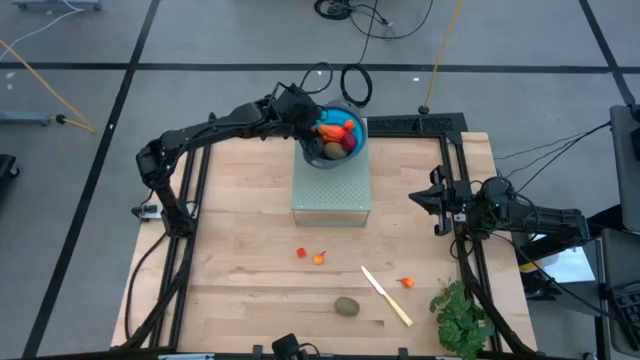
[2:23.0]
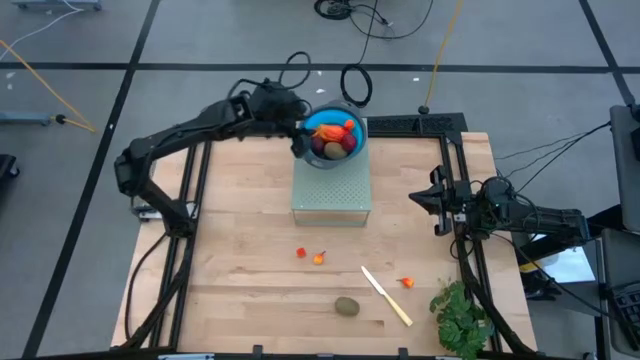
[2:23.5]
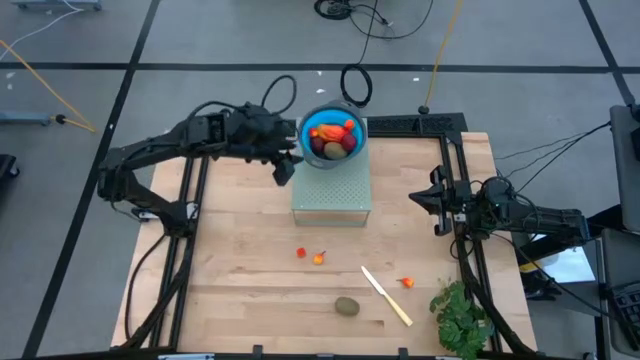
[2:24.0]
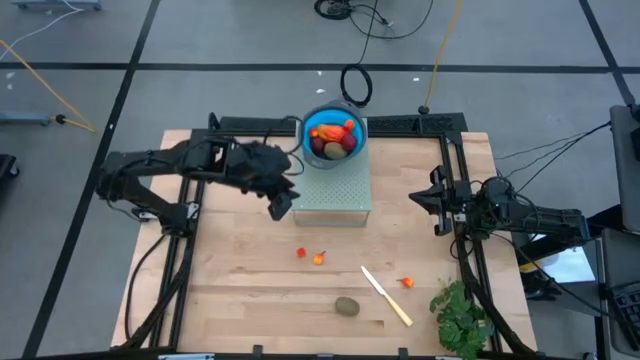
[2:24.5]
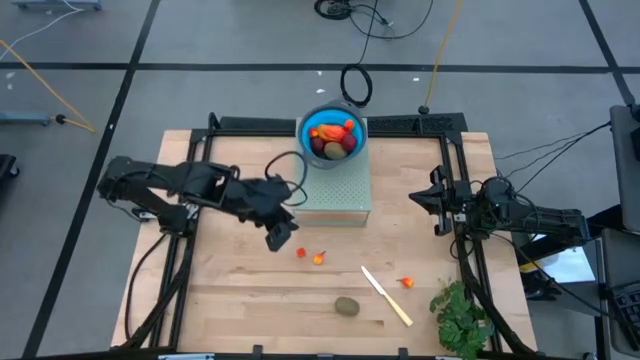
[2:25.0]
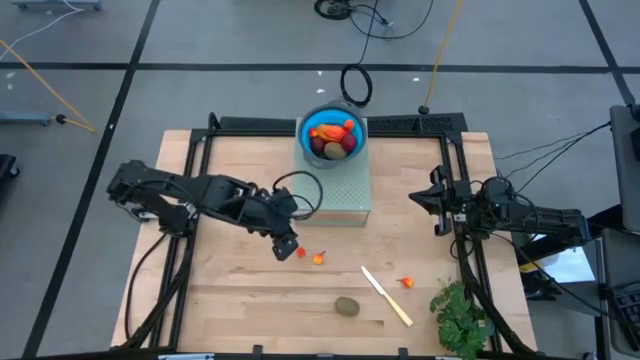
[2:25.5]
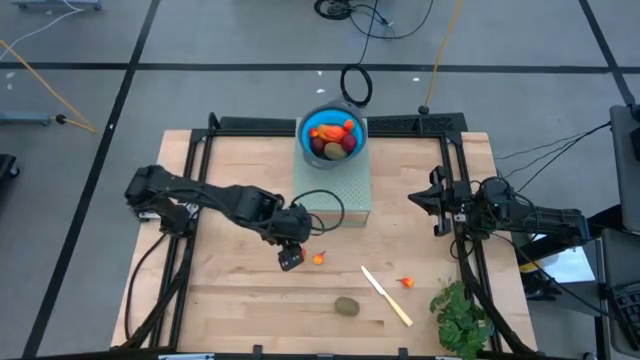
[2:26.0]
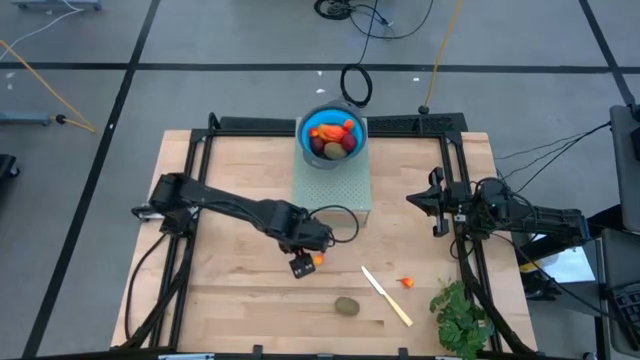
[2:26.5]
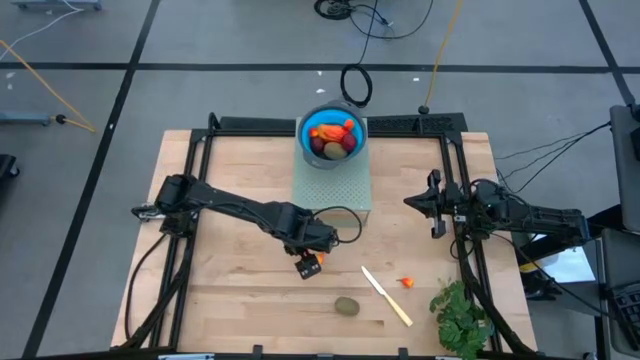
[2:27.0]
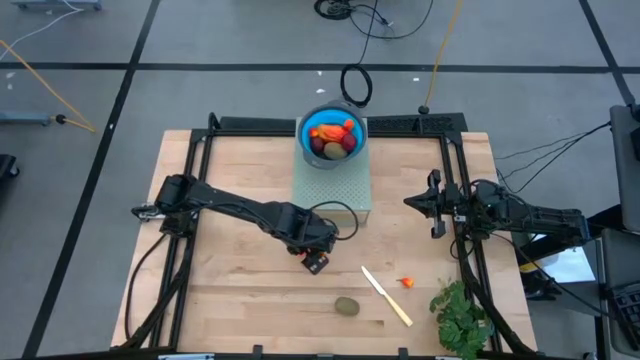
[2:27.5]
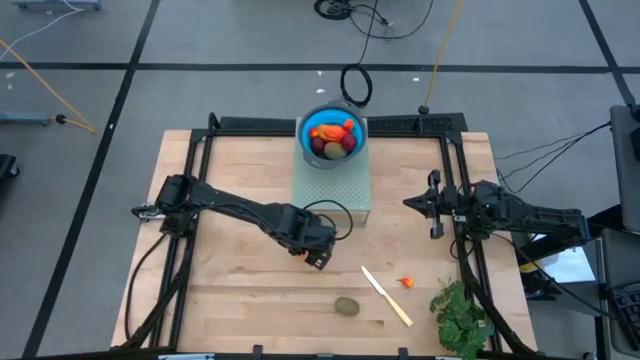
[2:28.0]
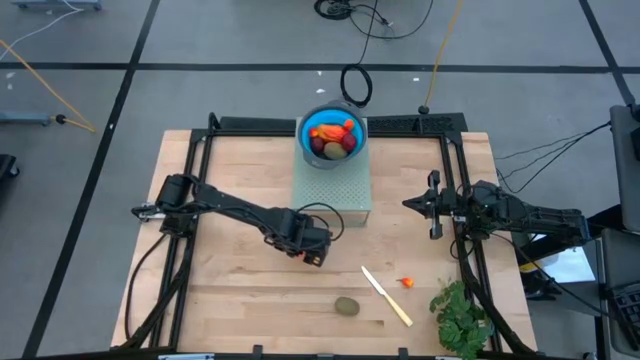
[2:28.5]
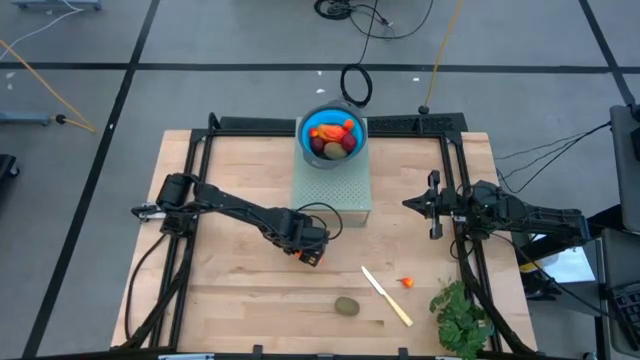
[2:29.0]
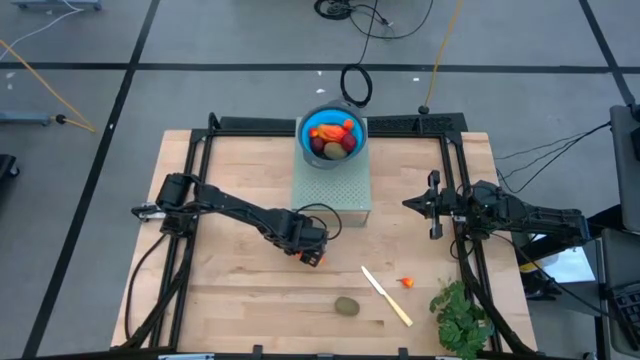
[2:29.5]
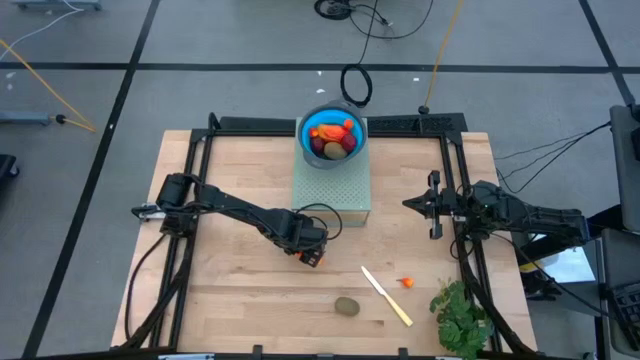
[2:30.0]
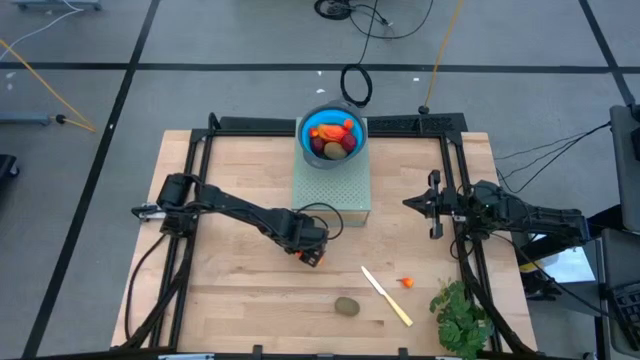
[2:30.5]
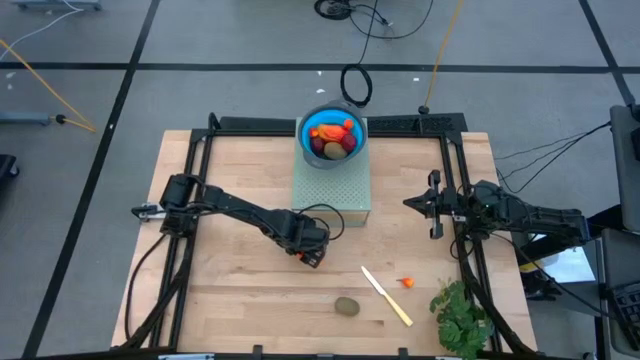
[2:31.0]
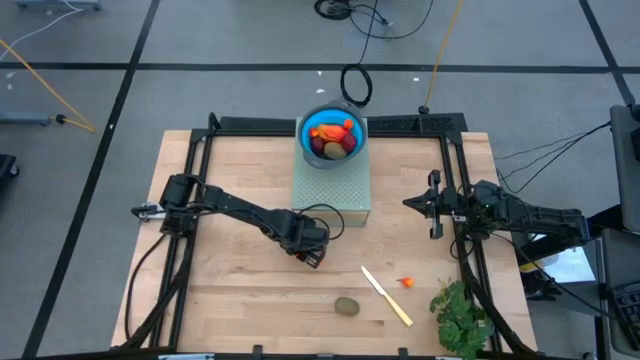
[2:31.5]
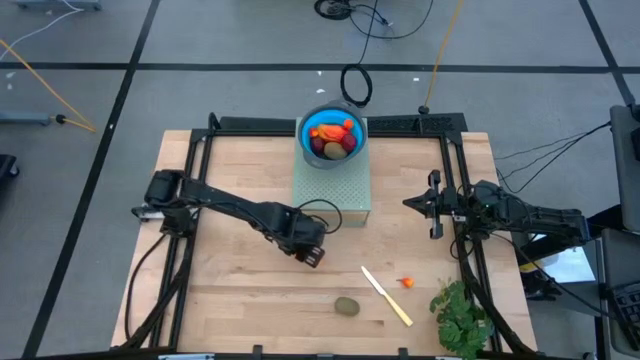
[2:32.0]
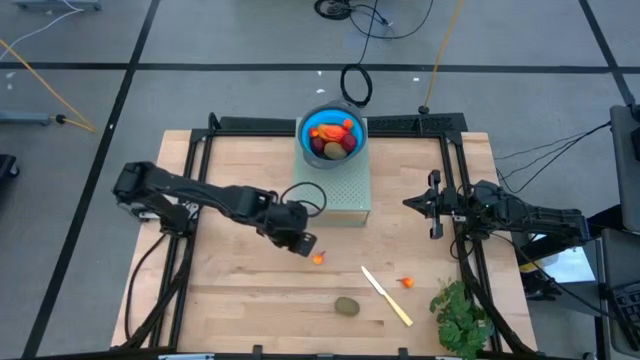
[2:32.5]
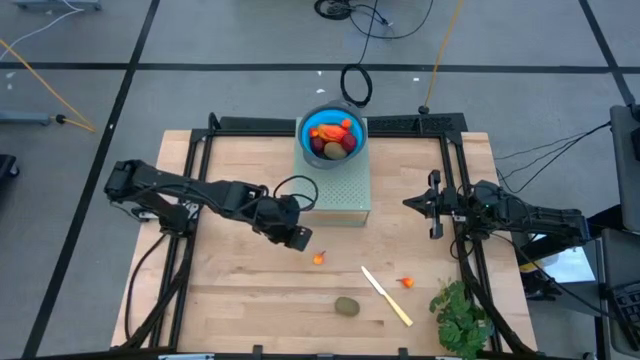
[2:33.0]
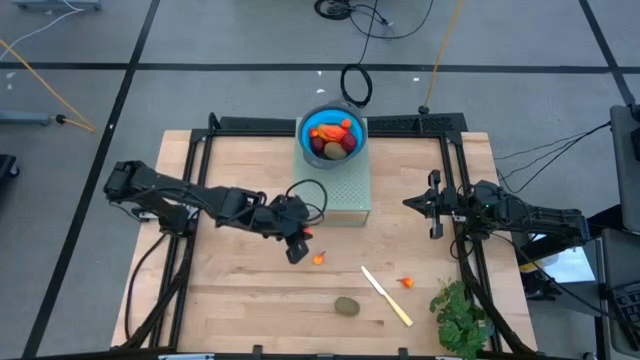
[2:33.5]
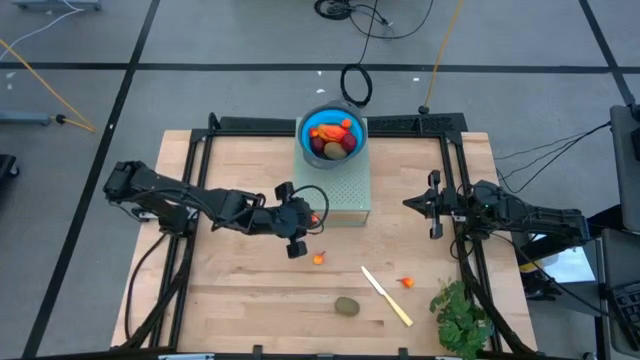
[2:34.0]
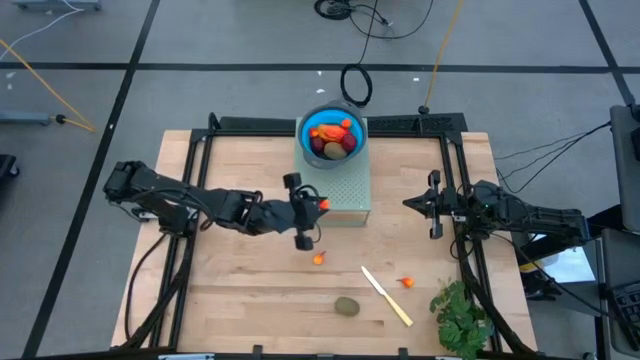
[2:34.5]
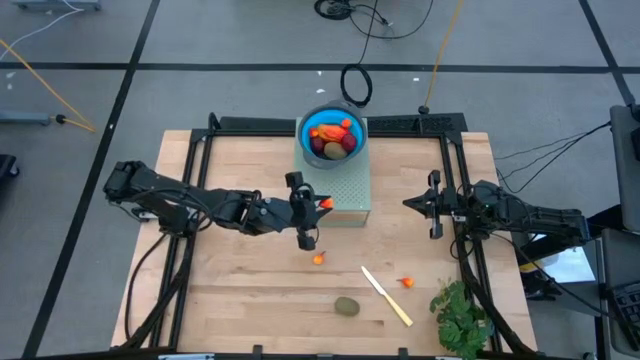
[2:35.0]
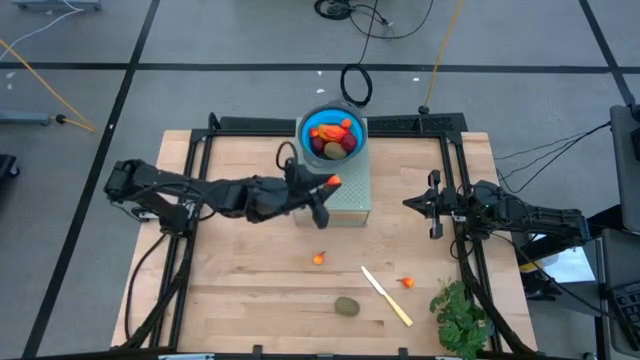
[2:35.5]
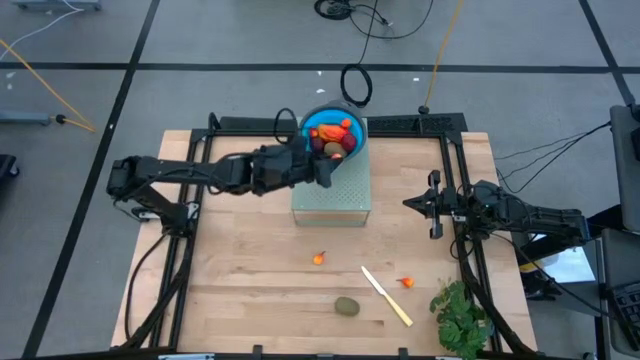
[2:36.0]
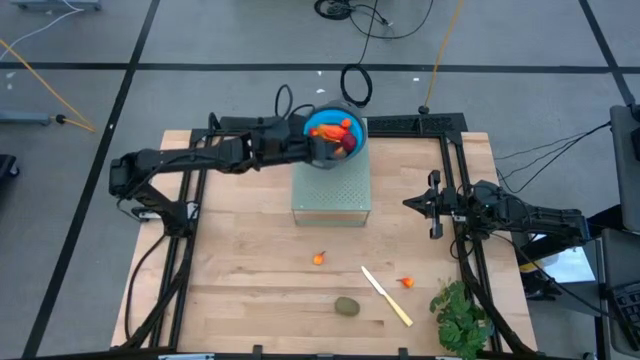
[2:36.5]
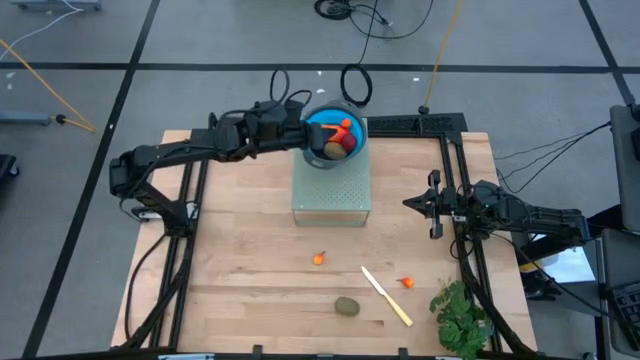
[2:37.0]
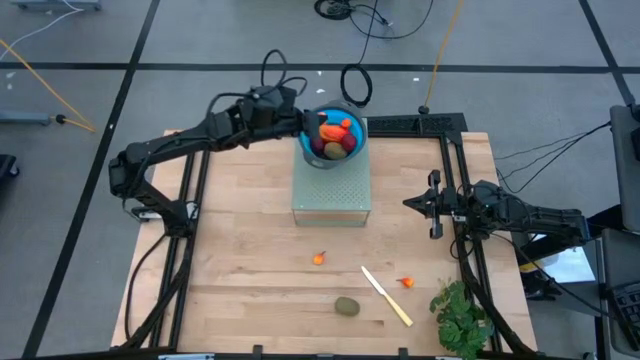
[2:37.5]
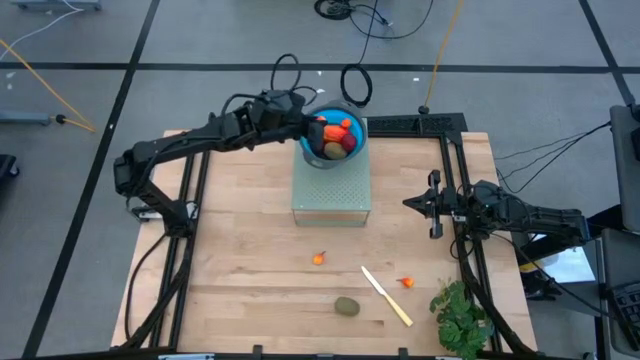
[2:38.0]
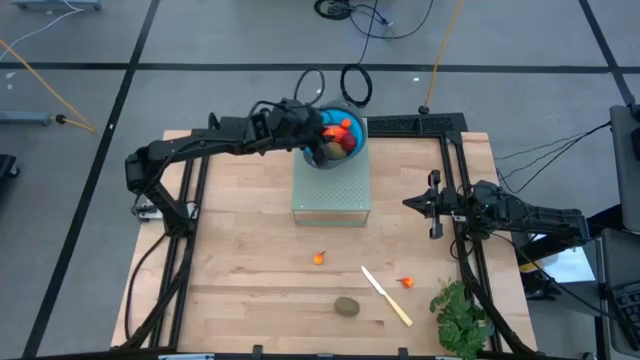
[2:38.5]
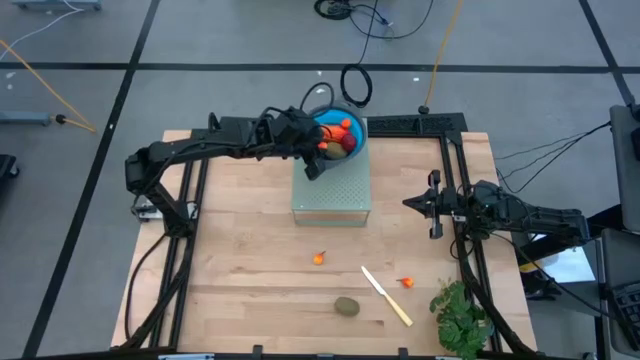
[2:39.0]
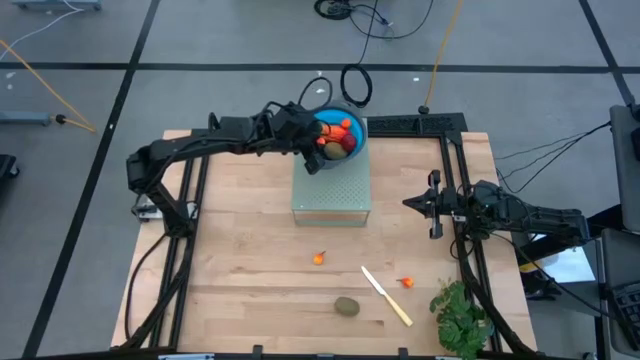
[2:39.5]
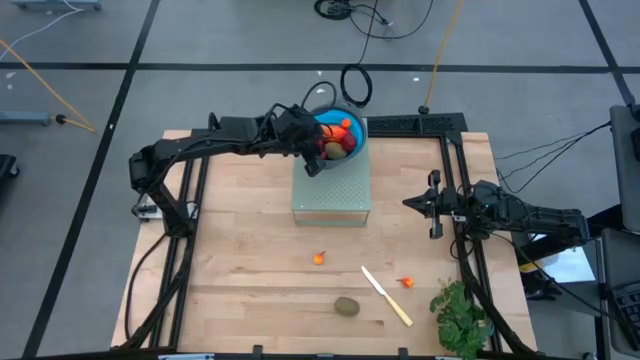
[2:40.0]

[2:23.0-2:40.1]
Task: Pick & Place Fruit
Put the peach into the blue strainer bowl on the shelf

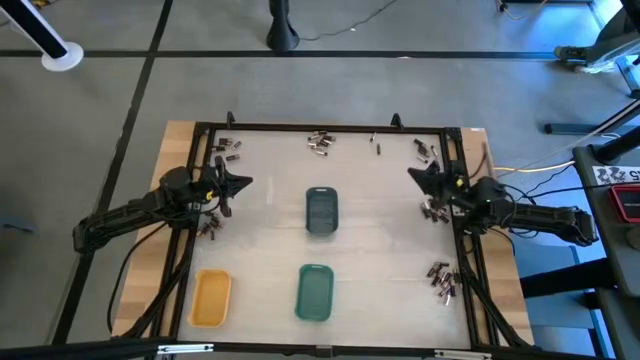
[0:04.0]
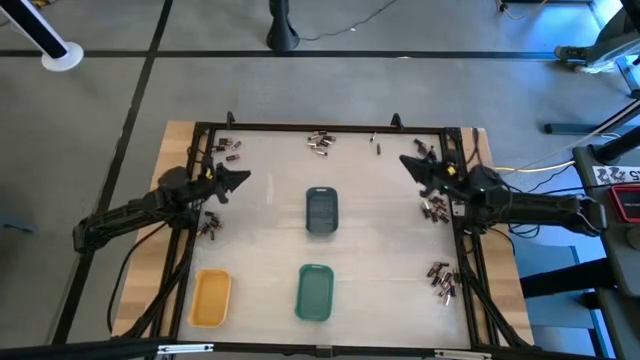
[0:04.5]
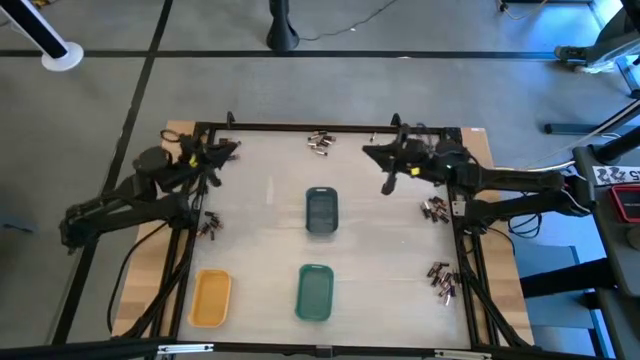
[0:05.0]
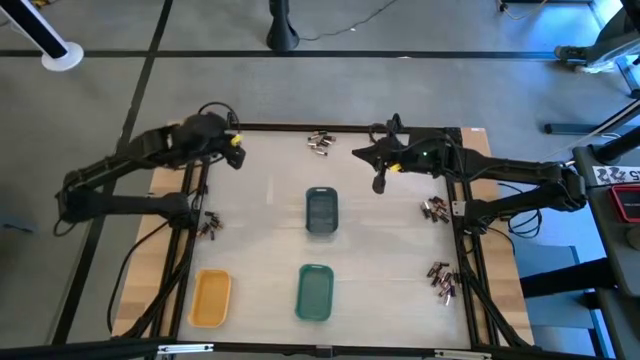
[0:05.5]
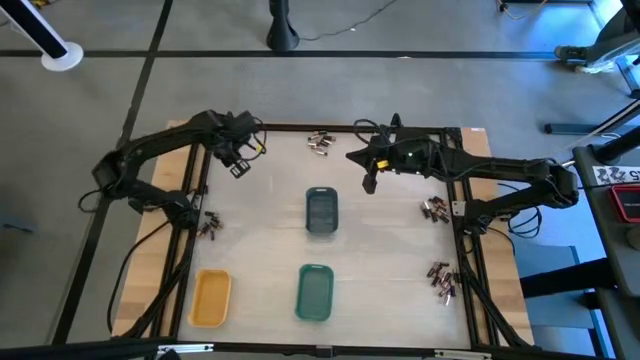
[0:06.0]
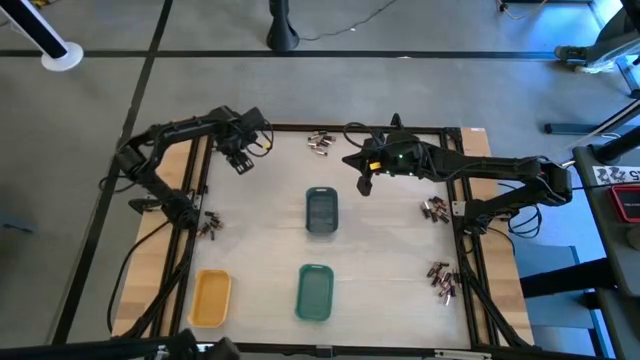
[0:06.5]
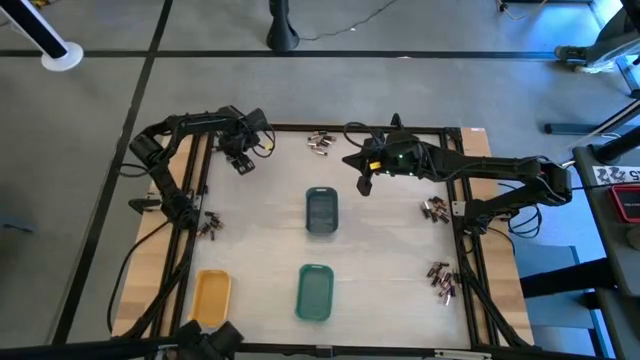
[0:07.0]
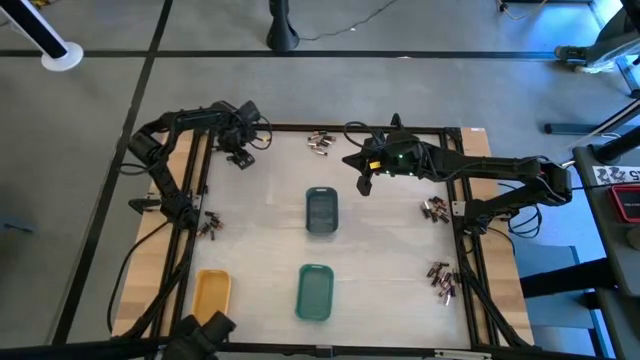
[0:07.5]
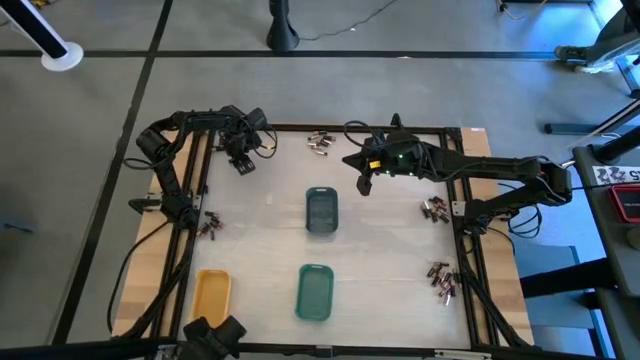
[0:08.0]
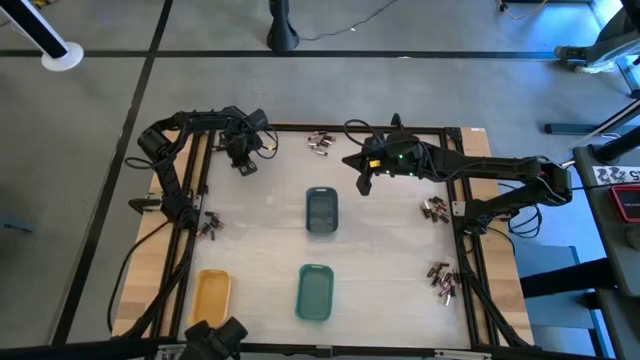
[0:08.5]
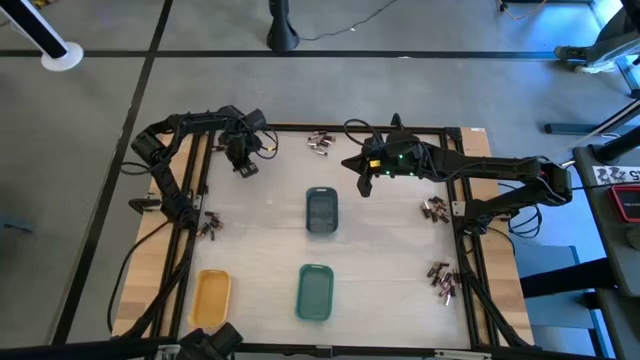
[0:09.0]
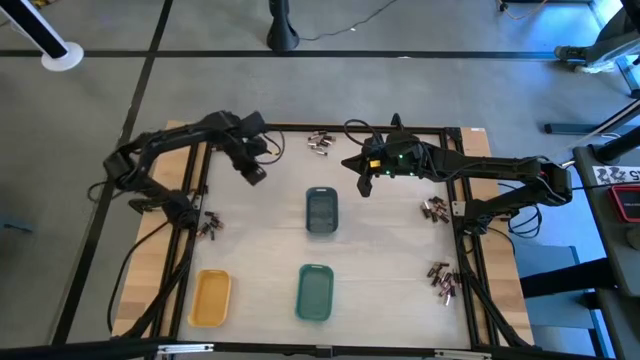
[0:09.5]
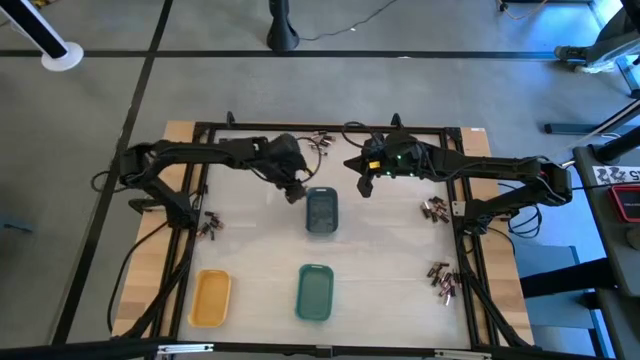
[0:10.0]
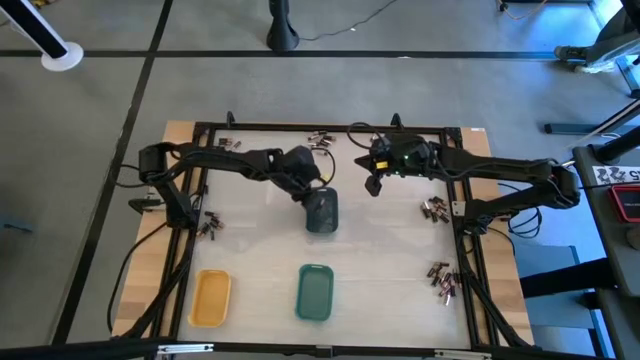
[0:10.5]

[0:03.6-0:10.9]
Task: Sort batteries
Put the large black battery into the blue bin
